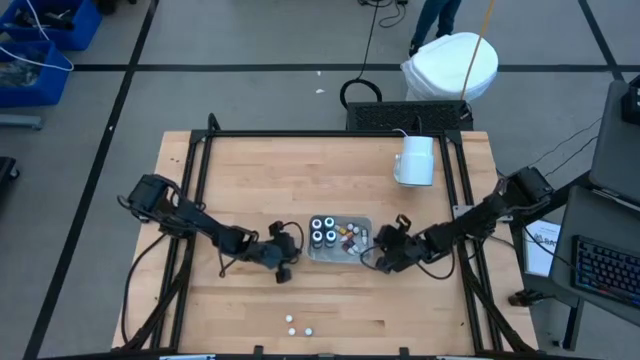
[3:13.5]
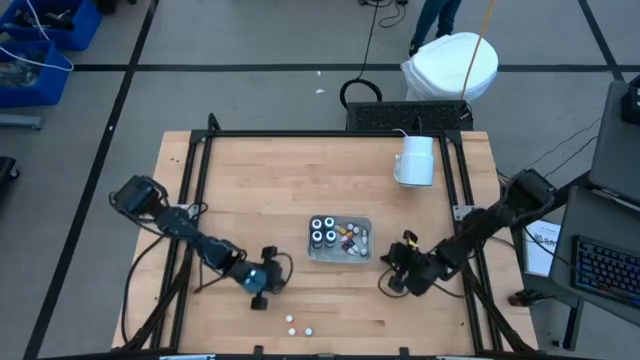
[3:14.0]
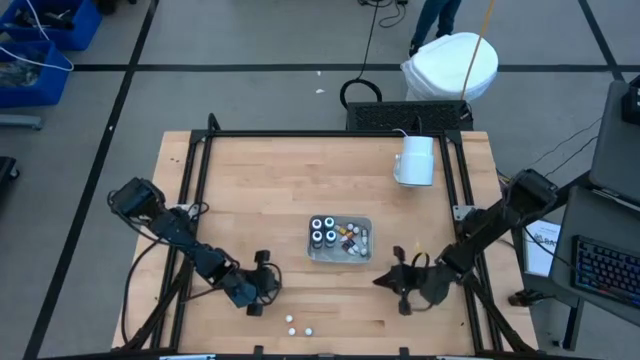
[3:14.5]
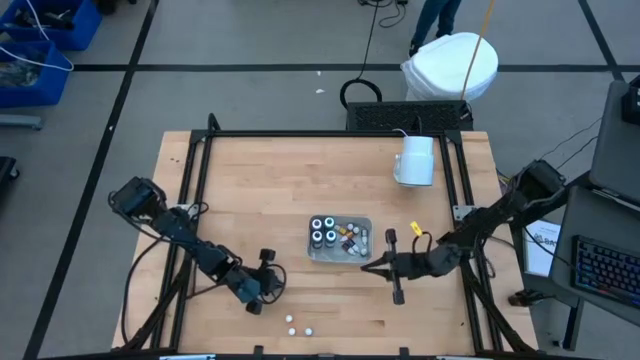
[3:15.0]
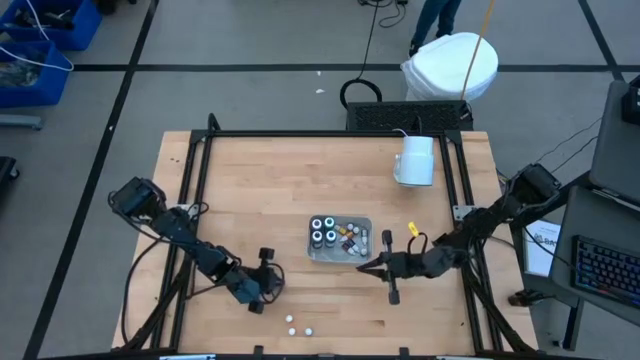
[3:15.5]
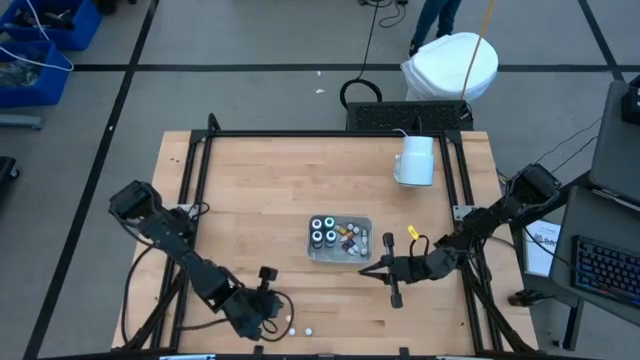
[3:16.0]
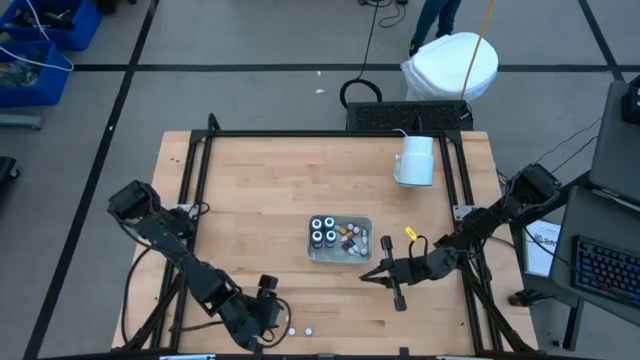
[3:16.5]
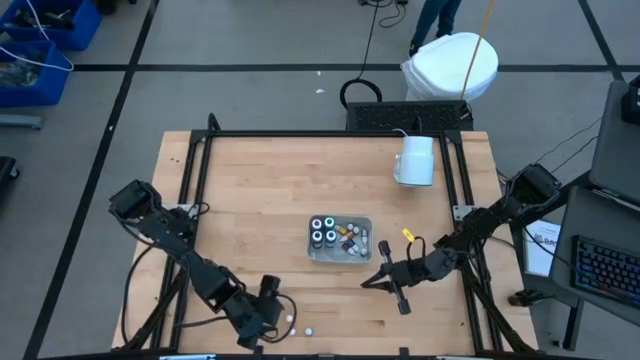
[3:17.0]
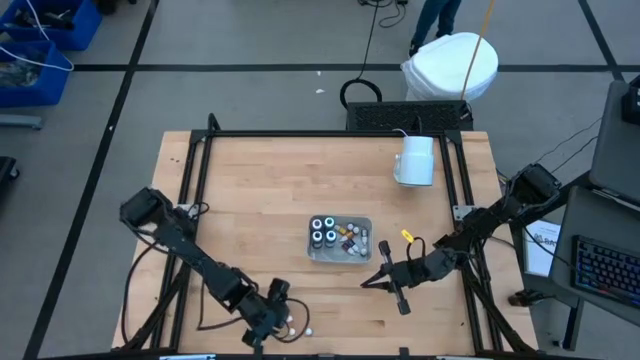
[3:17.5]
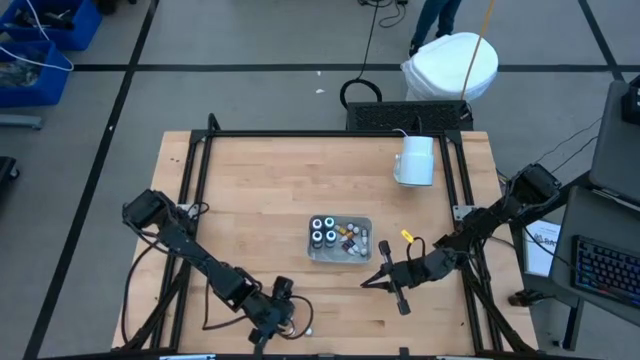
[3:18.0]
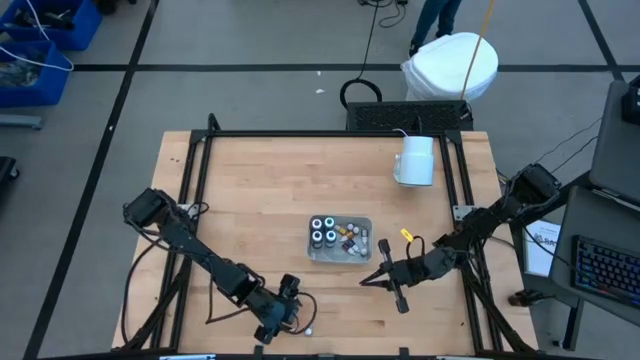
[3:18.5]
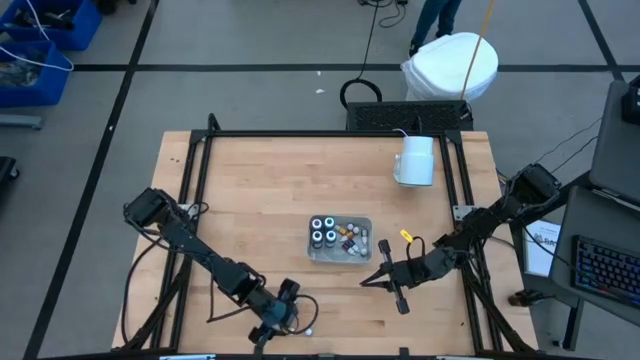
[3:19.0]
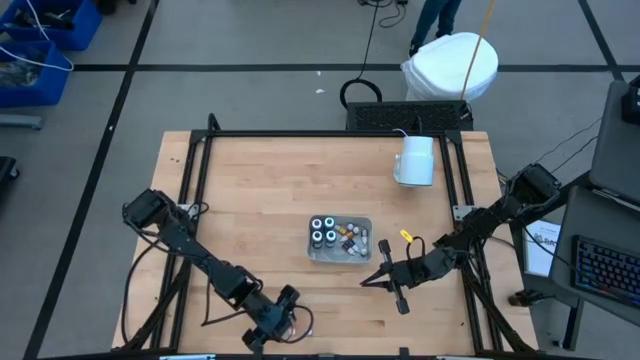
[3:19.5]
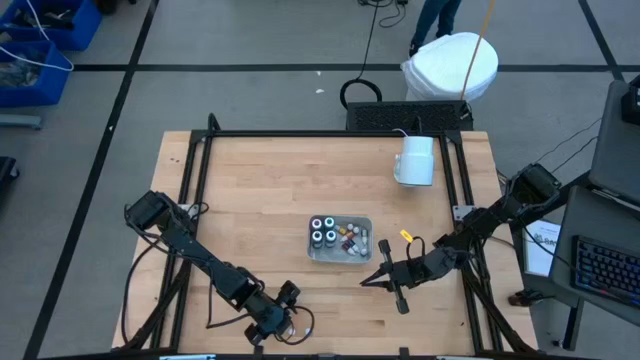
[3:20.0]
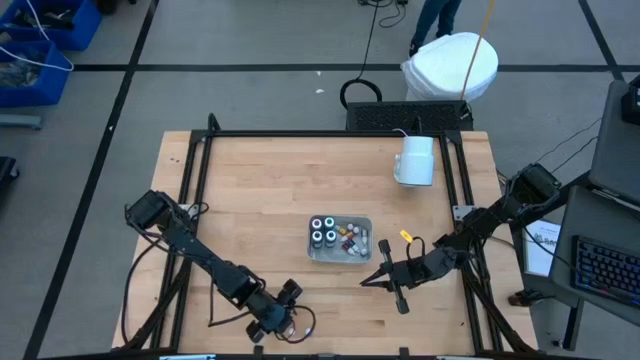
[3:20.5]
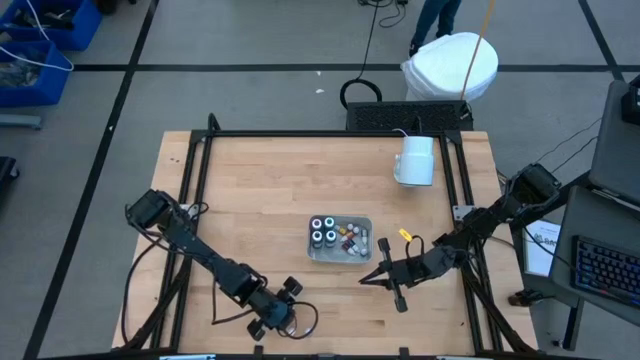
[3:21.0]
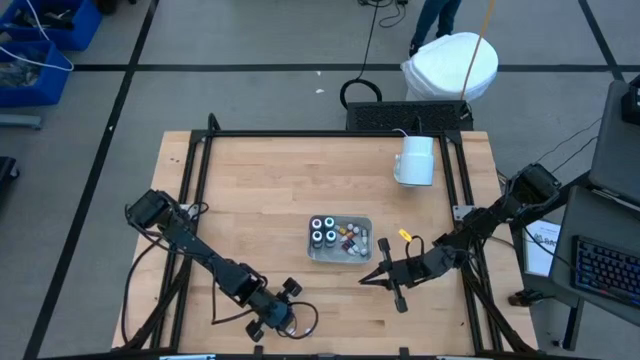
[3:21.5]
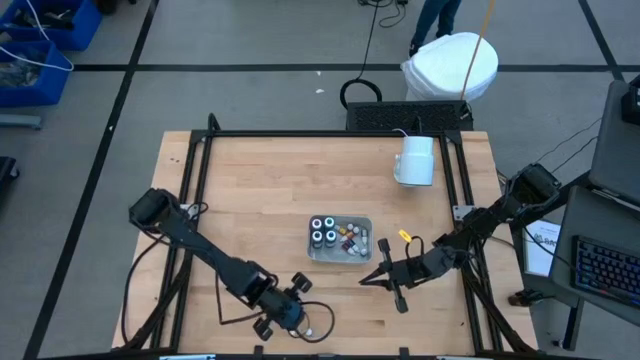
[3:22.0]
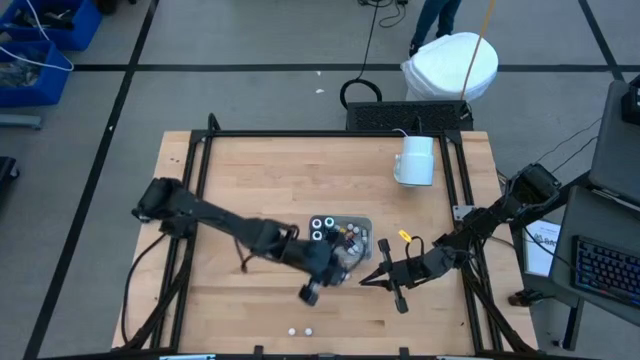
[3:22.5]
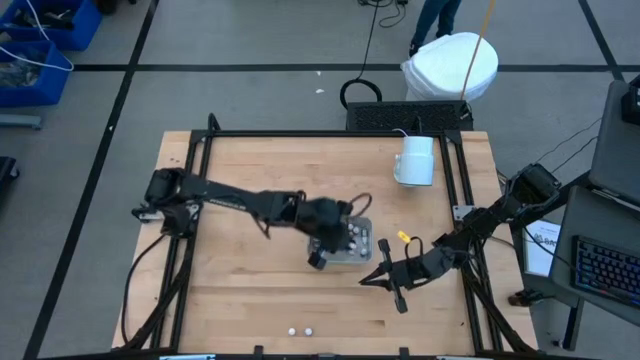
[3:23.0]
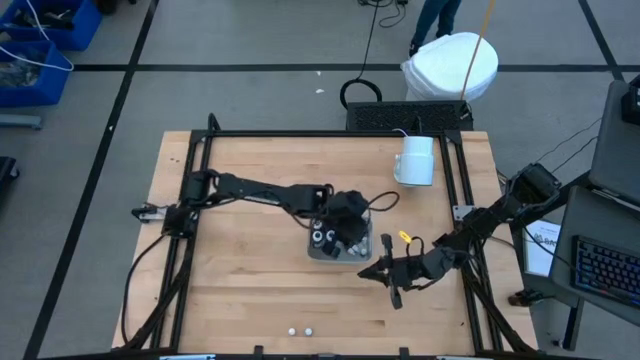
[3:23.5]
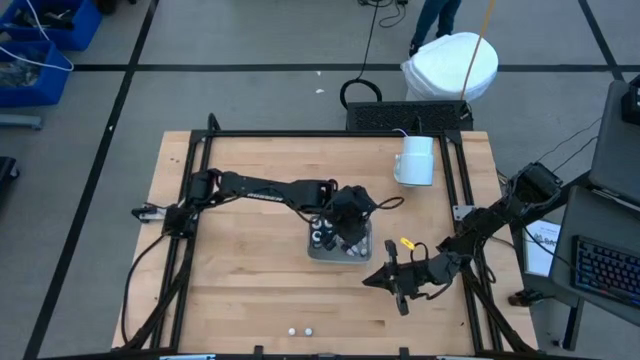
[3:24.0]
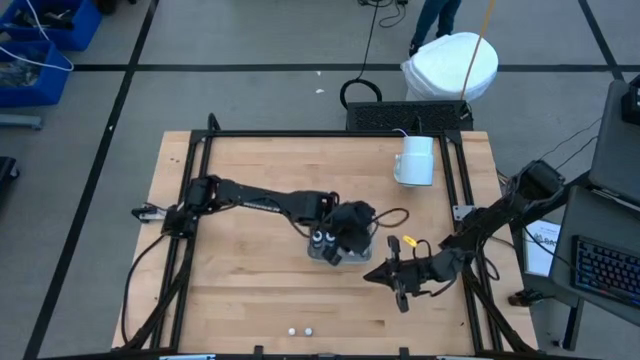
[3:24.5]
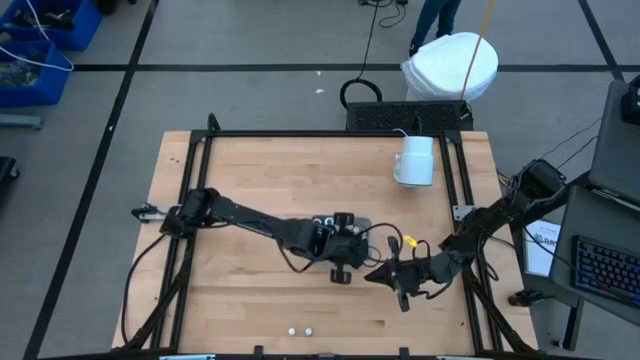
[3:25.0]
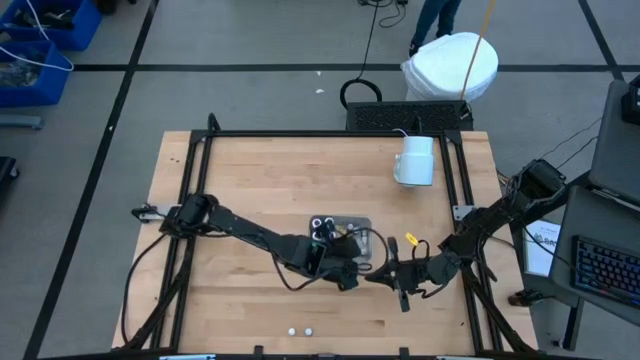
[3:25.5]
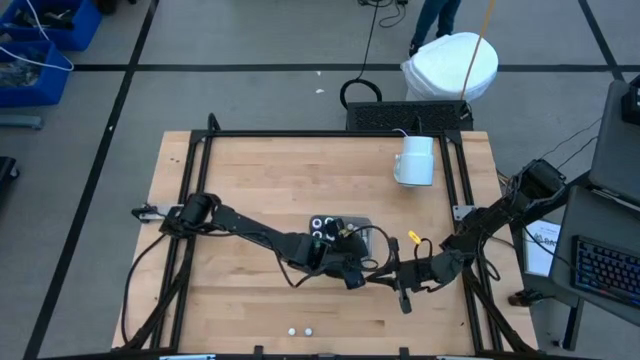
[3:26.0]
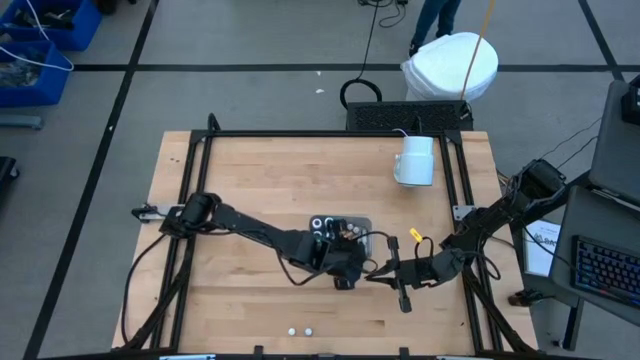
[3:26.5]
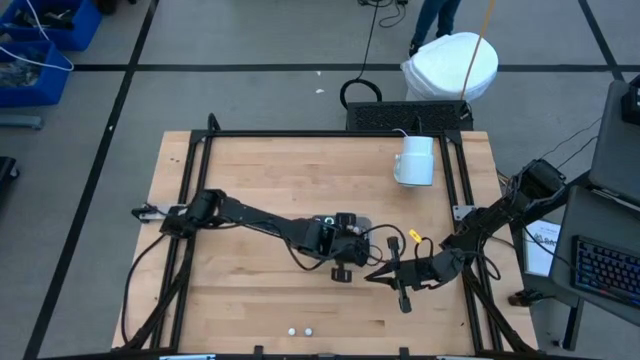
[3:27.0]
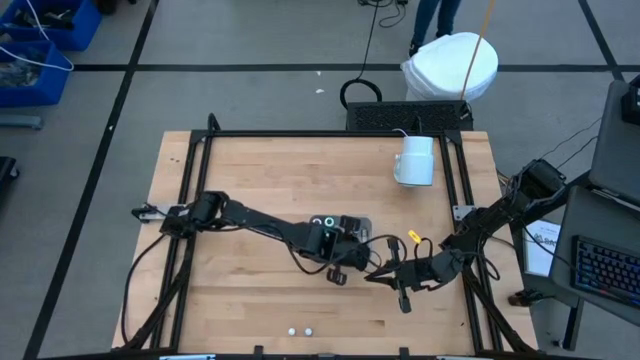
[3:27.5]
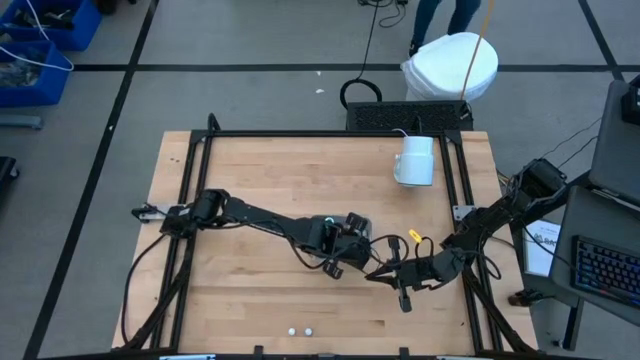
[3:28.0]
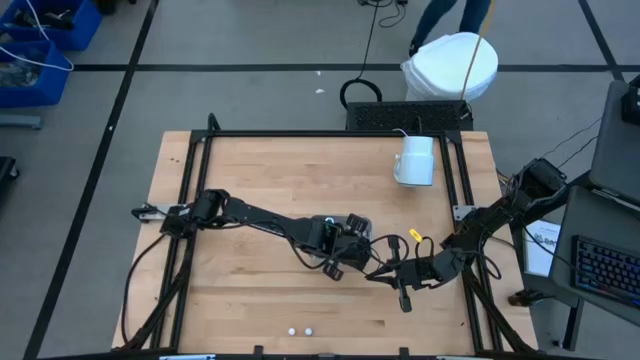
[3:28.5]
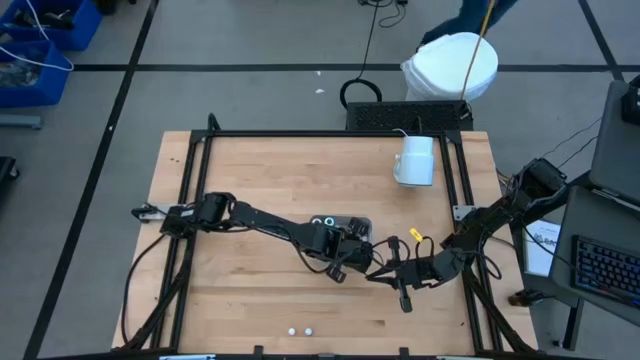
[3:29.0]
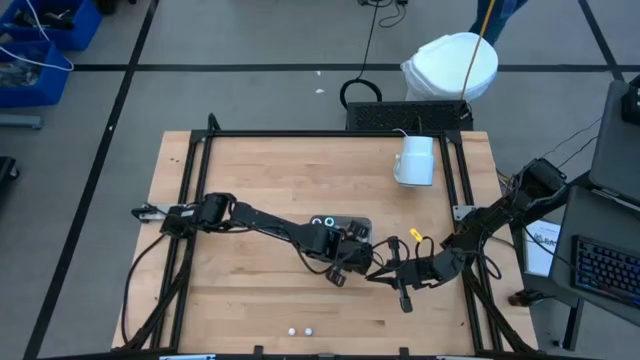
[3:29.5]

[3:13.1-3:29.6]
Task: Pick & Place food coloring
Put the small orange food coloring into the gray bin

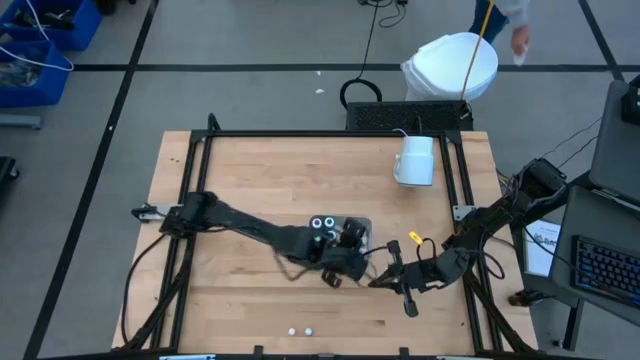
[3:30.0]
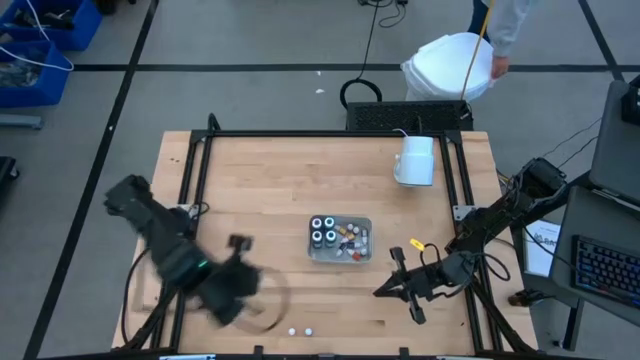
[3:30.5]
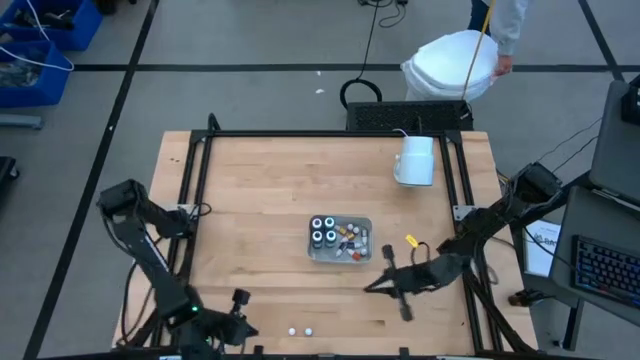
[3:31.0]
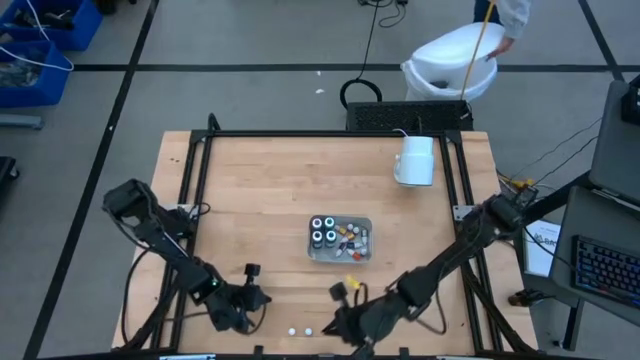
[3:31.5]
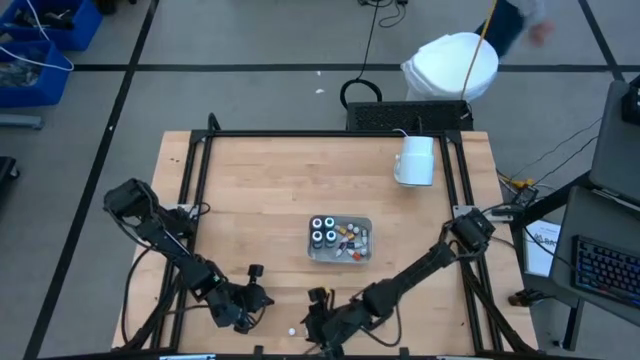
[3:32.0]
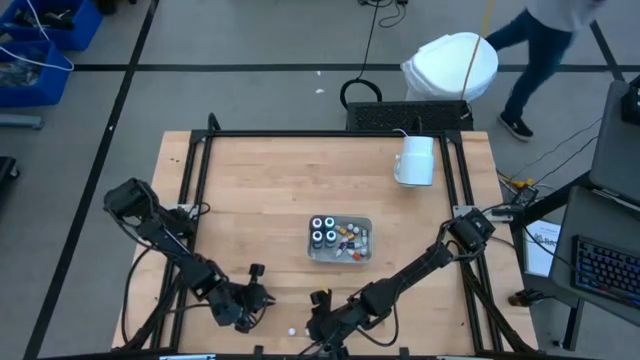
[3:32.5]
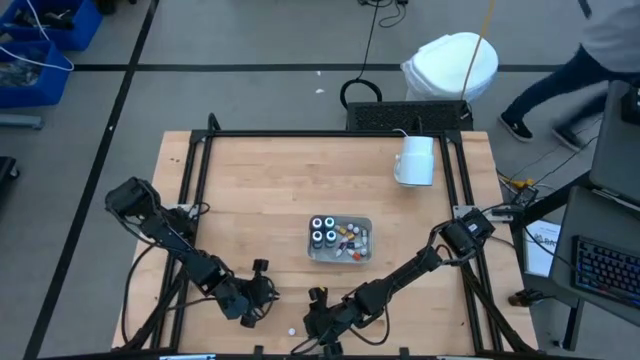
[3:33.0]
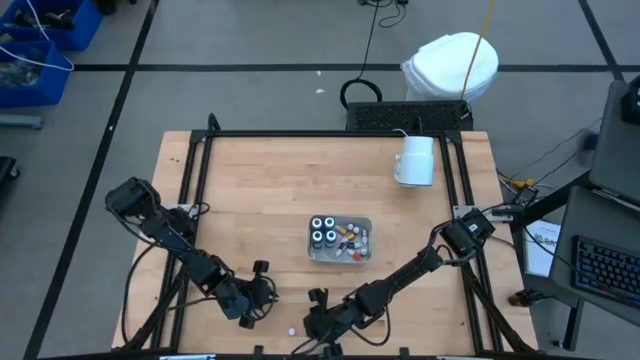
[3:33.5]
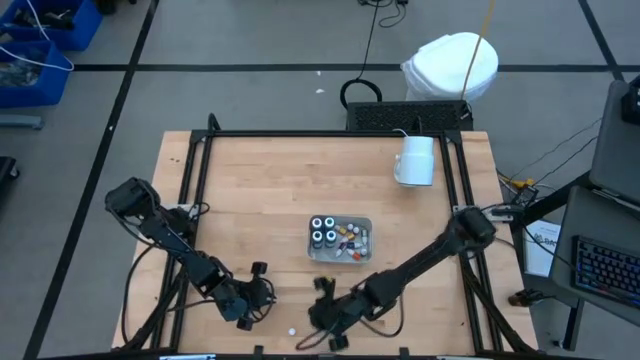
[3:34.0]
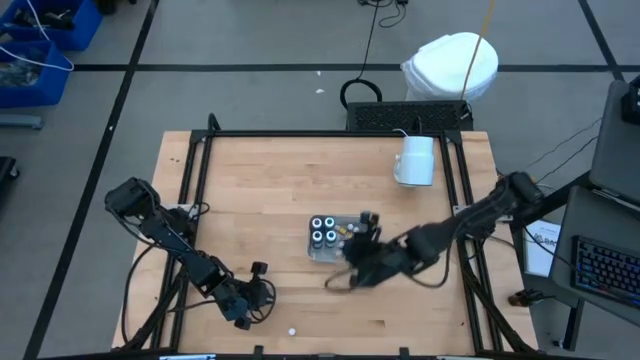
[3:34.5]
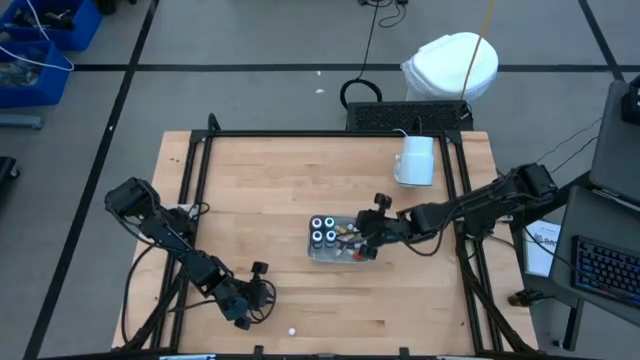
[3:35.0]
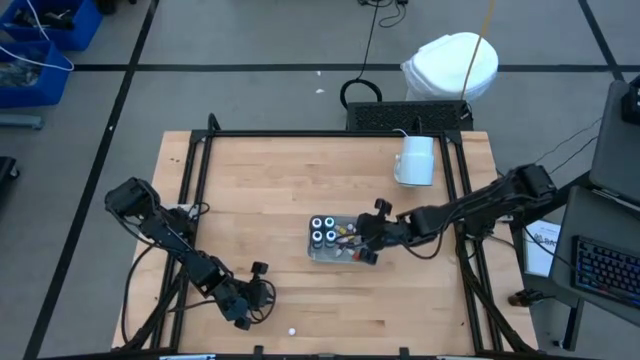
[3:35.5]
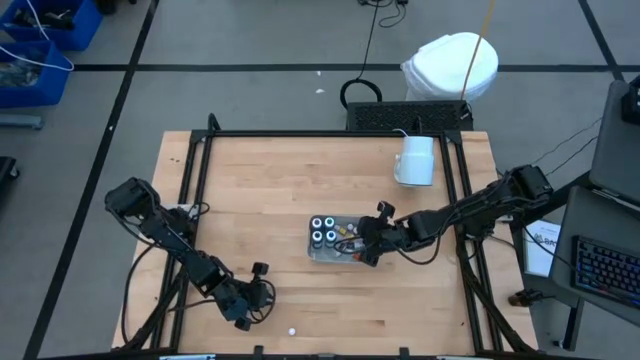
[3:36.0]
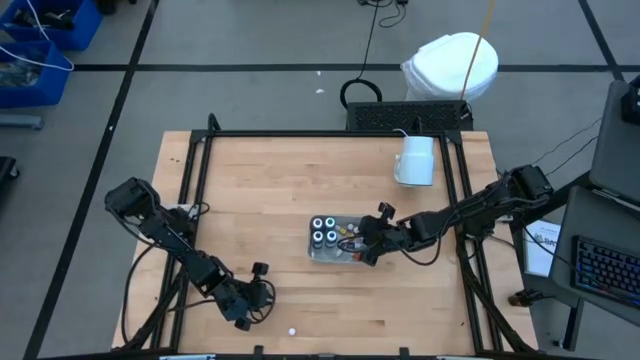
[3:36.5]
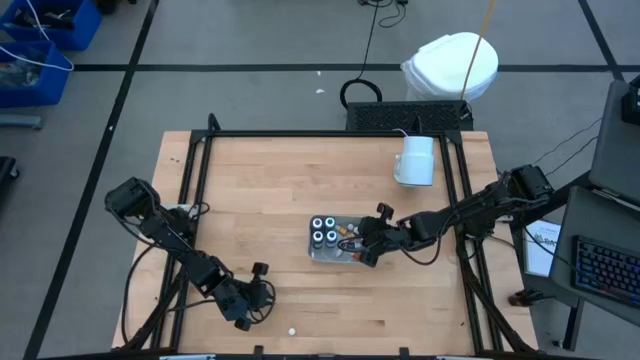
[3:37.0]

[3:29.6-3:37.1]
Put the small blue food coloring into the gray bin
